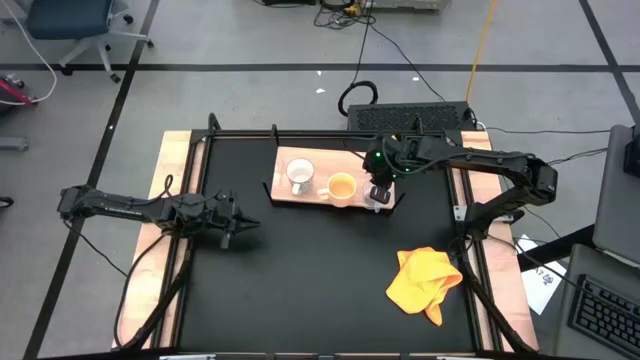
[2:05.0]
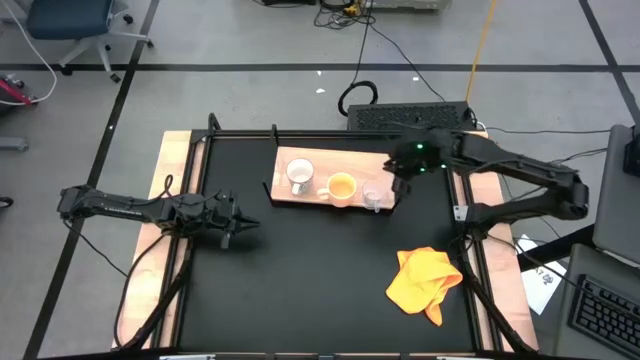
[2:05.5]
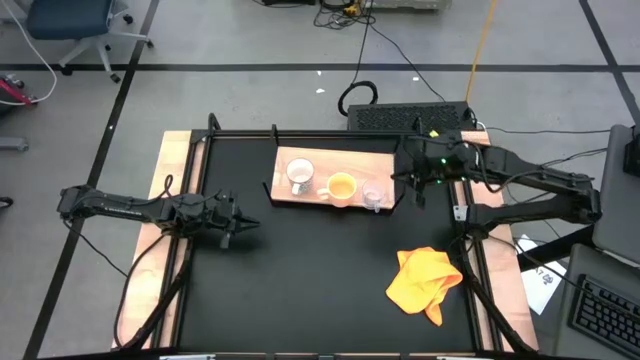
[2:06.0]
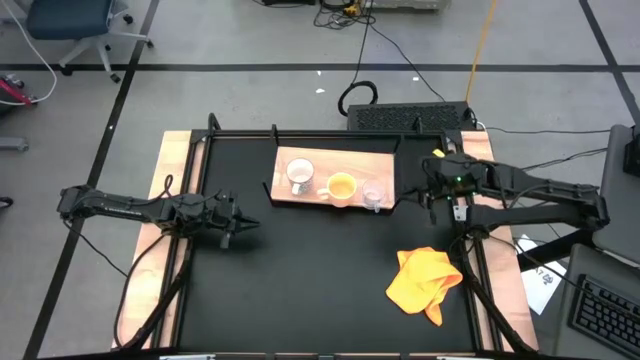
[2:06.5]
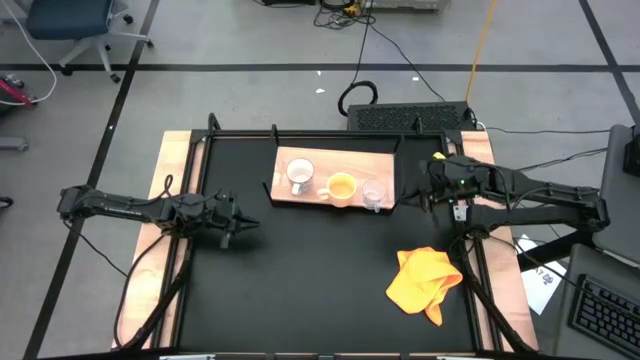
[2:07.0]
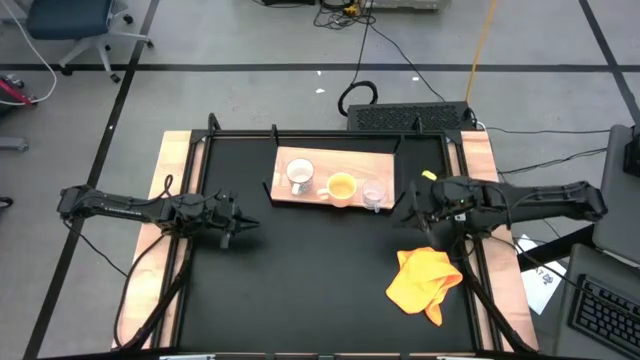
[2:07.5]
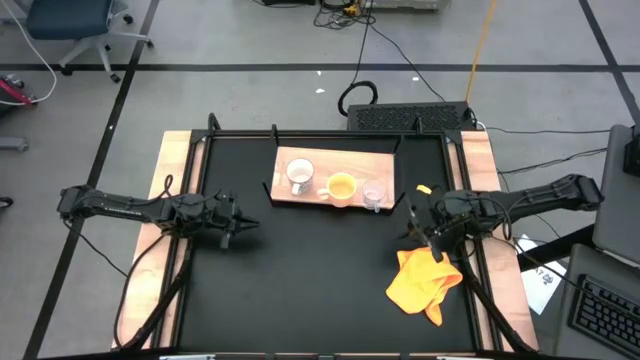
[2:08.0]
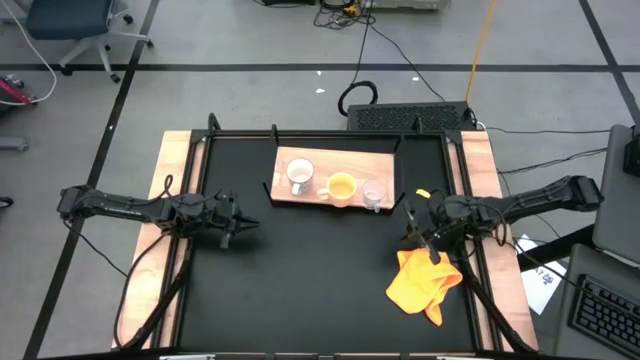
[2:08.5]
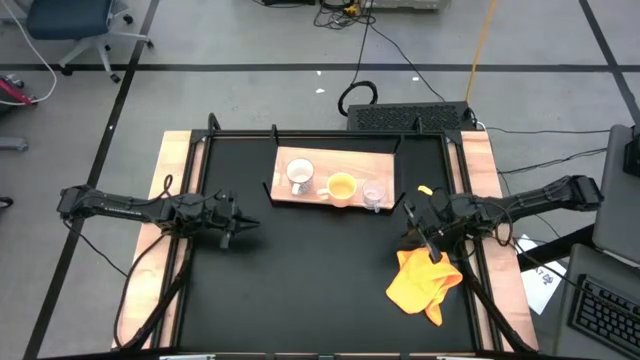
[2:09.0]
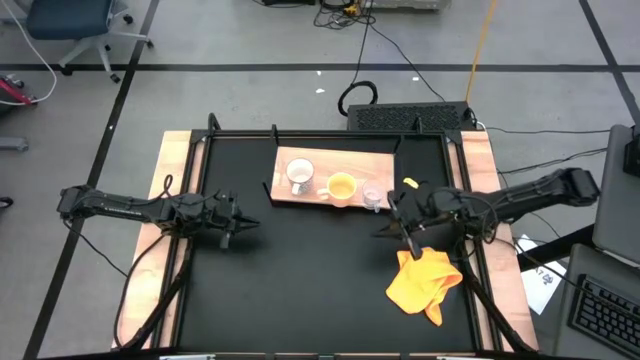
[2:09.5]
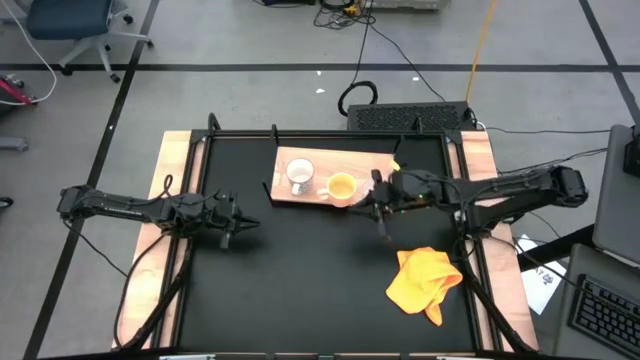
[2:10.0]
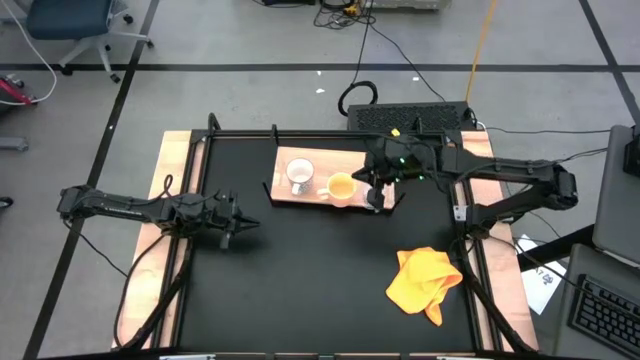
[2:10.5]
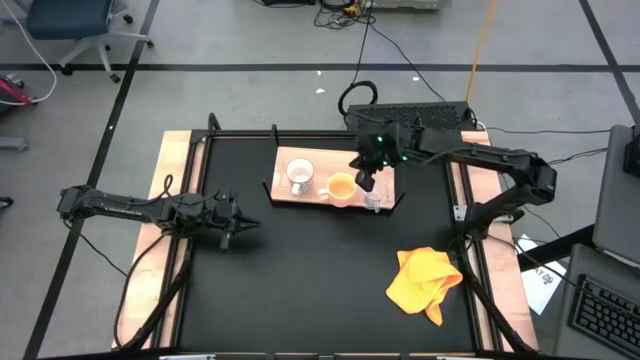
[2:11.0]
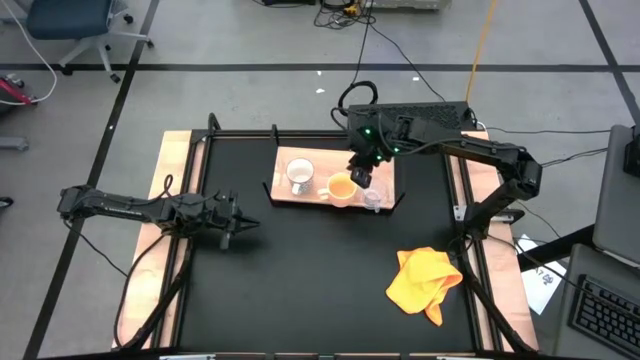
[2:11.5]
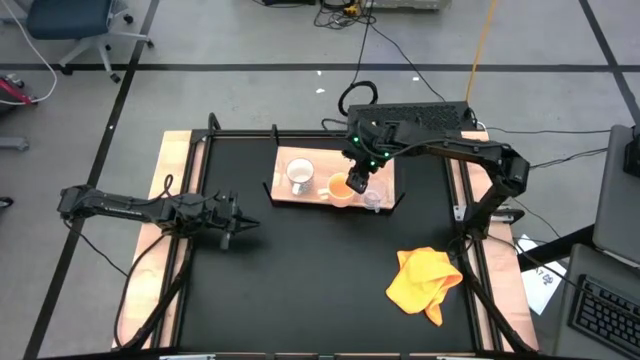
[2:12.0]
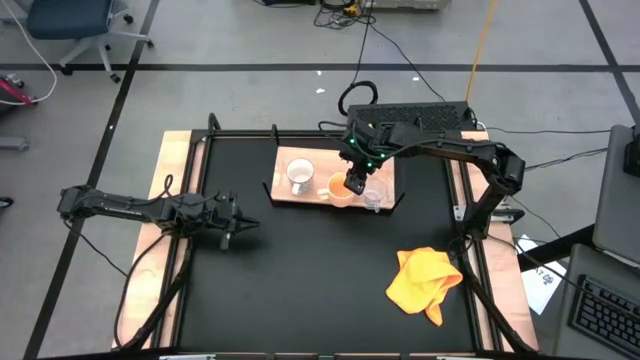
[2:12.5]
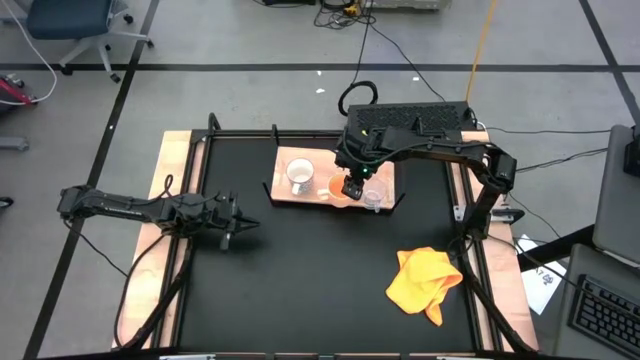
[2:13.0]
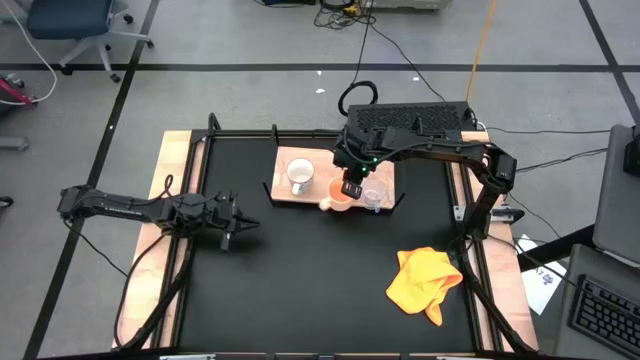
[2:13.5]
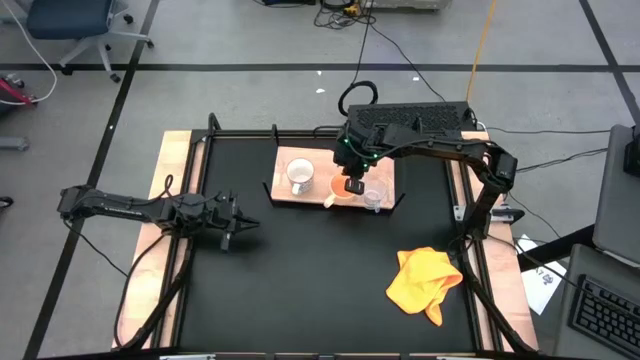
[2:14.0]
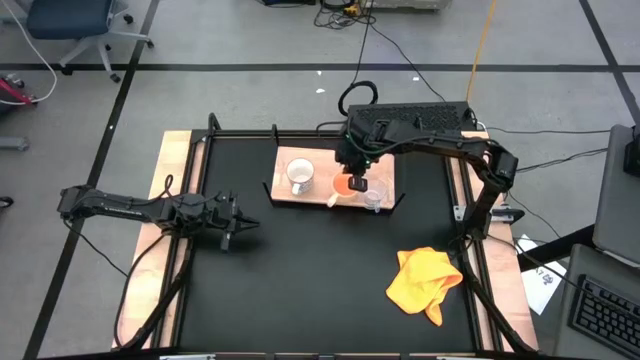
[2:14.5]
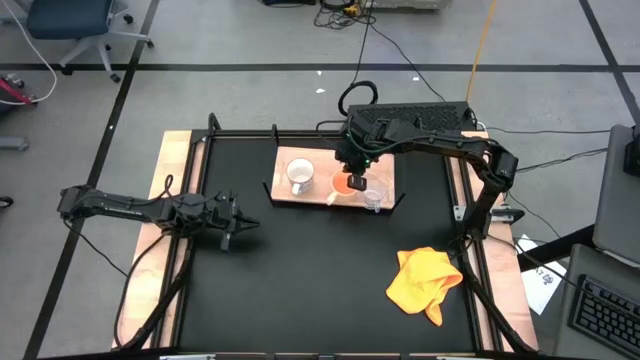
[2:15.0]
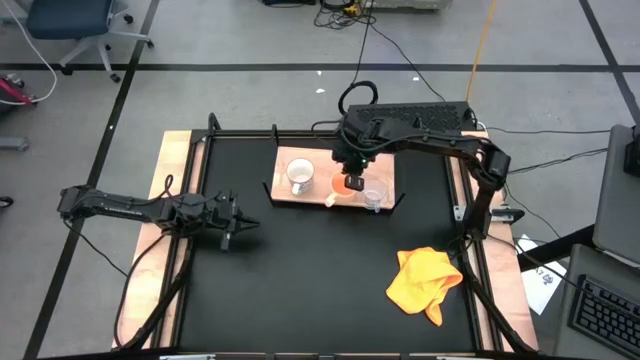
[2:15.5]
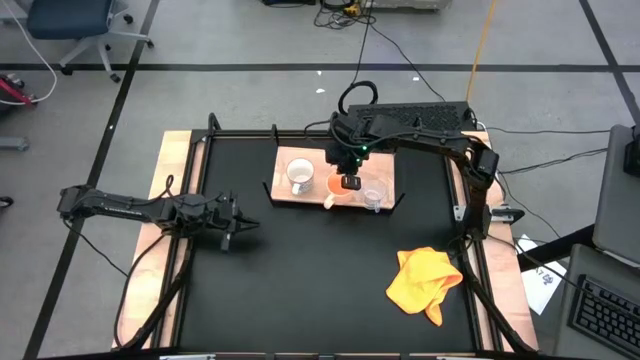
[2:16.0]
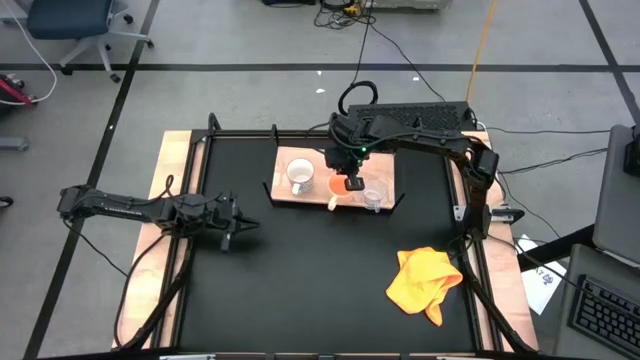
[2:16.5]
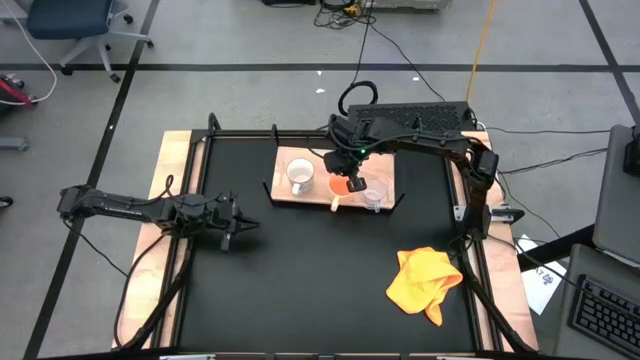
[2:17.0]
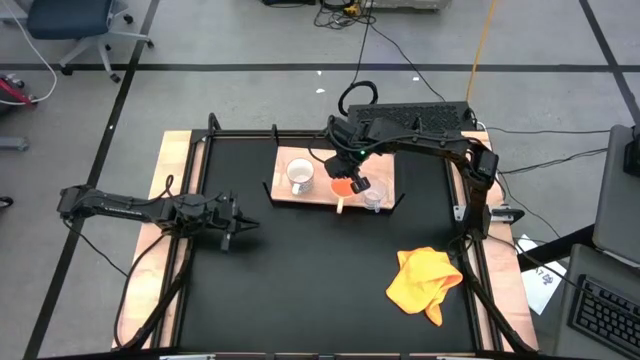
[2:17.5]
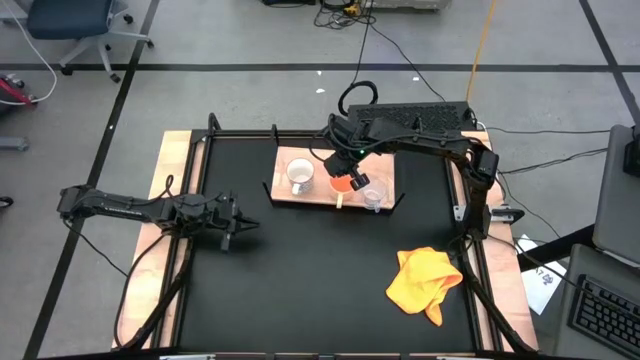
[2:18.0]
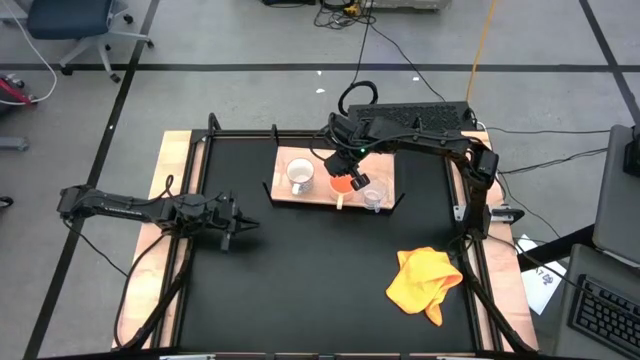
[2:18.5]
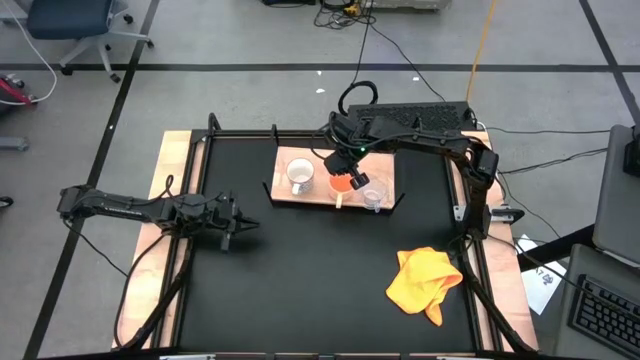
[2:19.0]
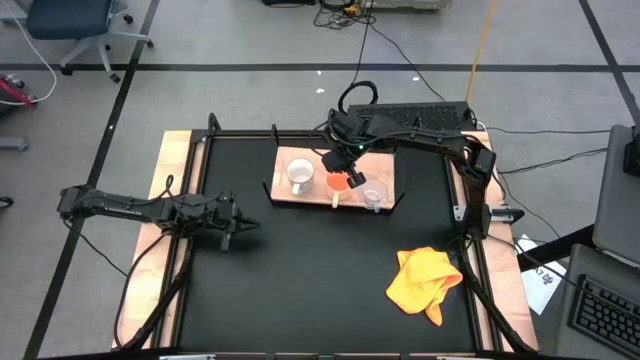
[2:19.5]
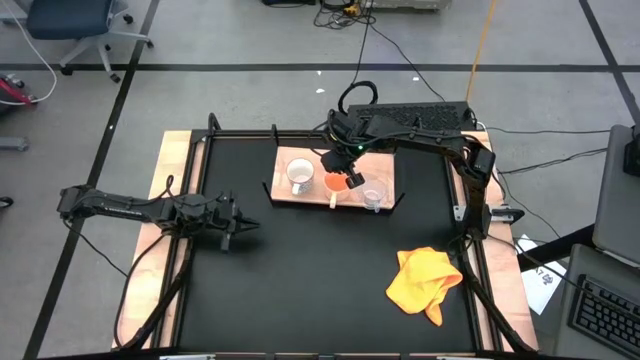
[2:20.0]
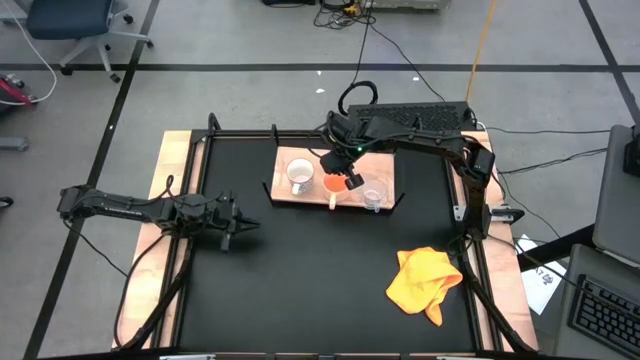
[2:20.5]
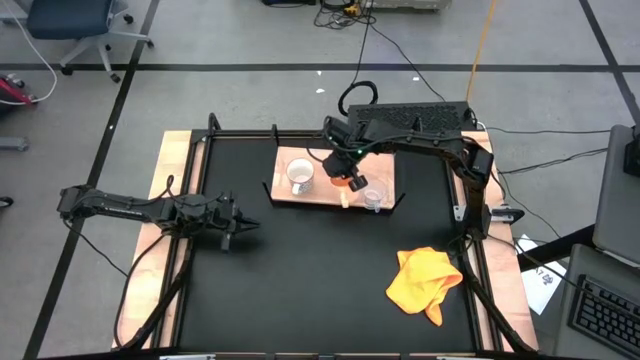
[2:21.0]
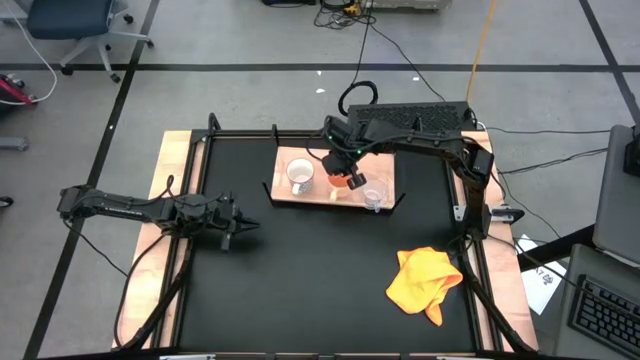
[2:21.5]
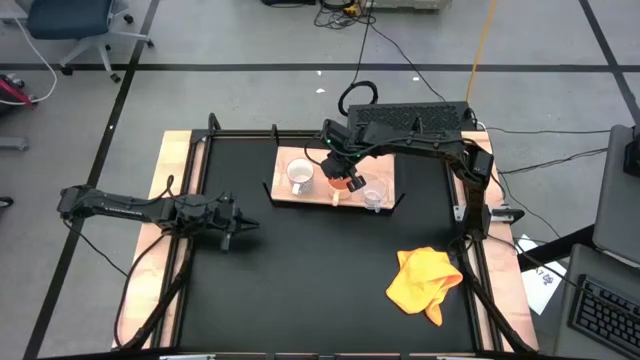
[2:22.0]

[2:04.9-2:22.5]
Task: Stack small to large cups/mugs on shelf
Adjust the orange mug on the shelf
